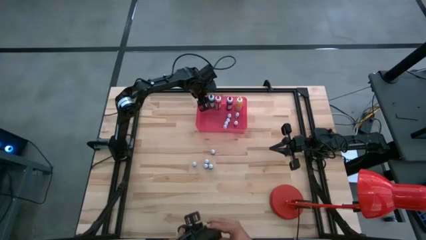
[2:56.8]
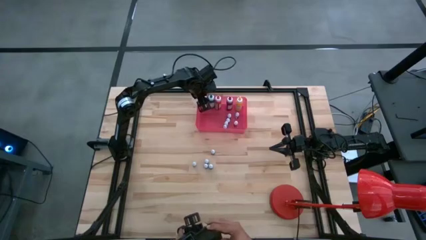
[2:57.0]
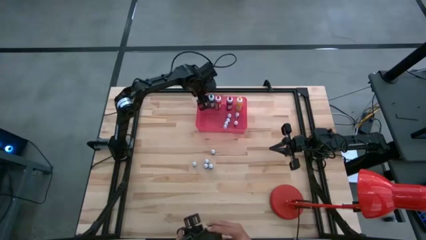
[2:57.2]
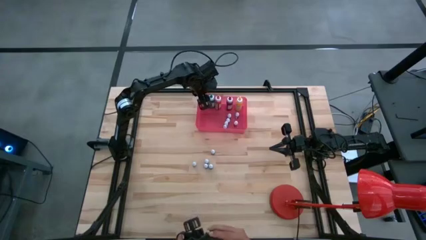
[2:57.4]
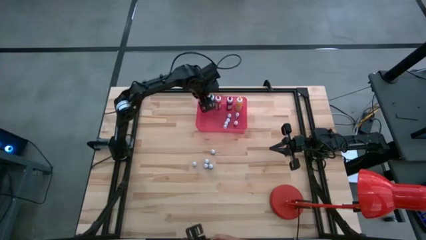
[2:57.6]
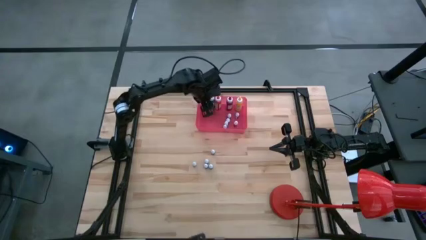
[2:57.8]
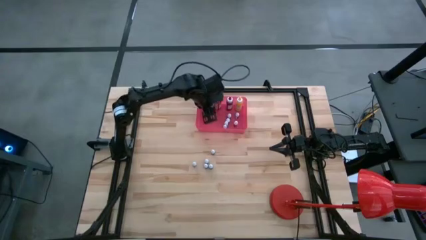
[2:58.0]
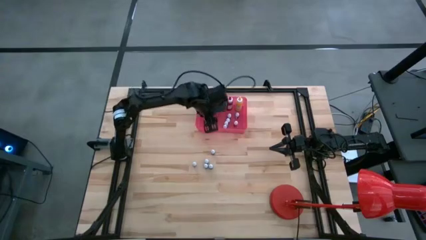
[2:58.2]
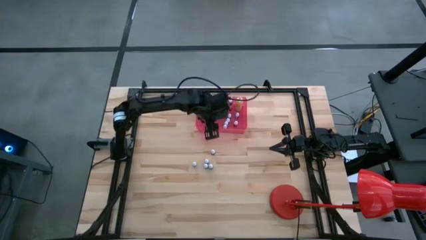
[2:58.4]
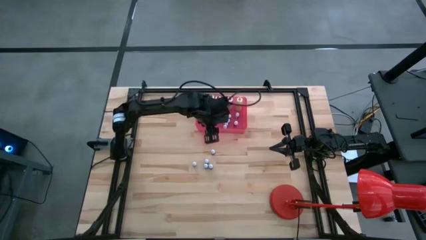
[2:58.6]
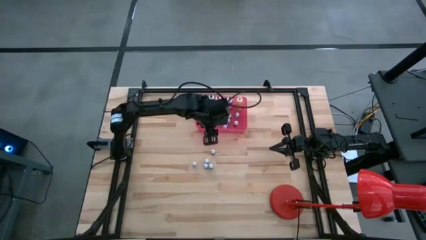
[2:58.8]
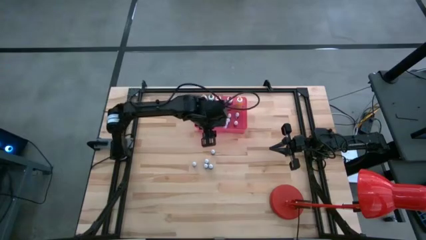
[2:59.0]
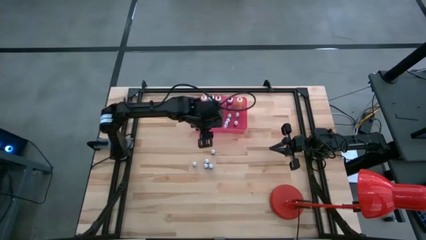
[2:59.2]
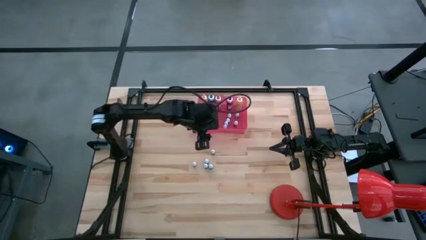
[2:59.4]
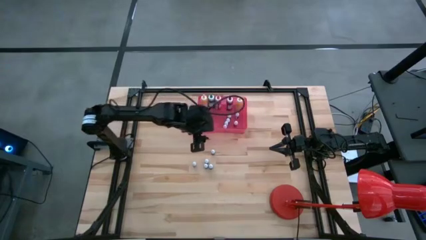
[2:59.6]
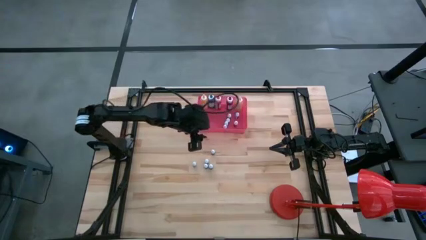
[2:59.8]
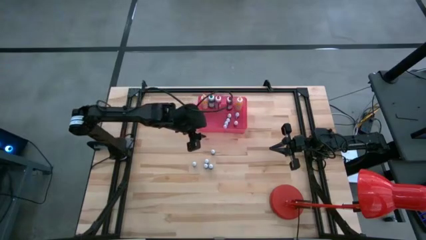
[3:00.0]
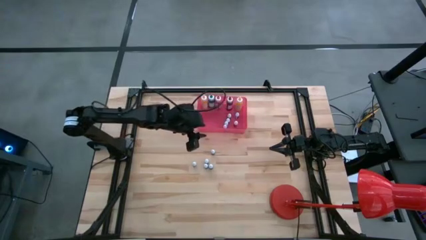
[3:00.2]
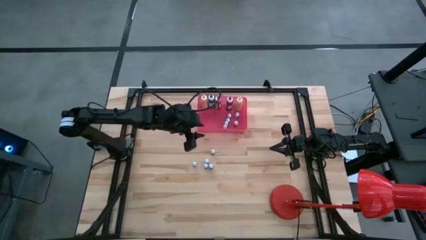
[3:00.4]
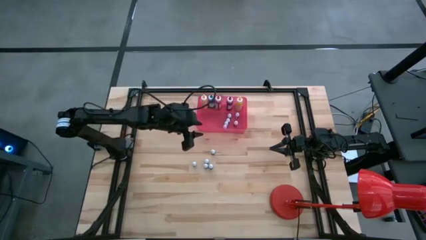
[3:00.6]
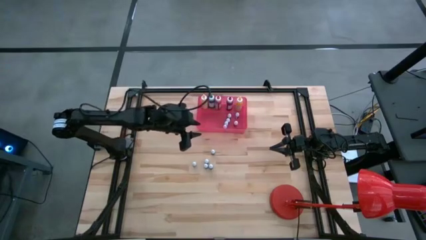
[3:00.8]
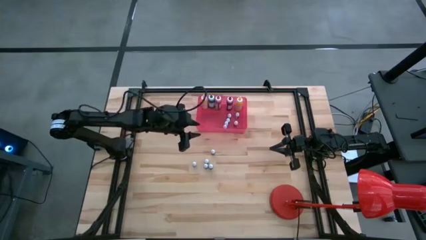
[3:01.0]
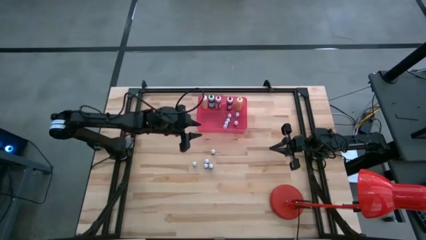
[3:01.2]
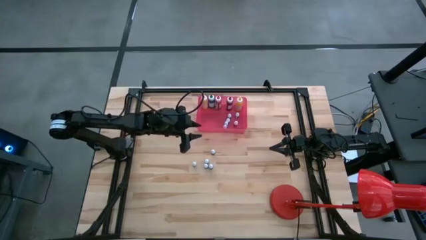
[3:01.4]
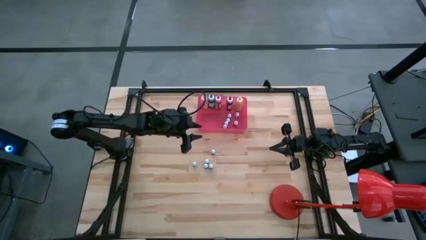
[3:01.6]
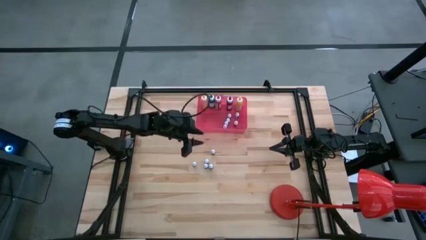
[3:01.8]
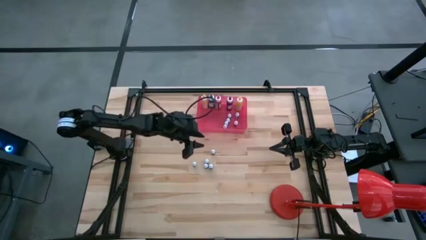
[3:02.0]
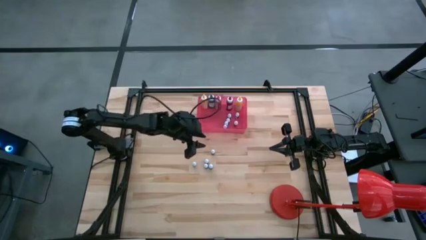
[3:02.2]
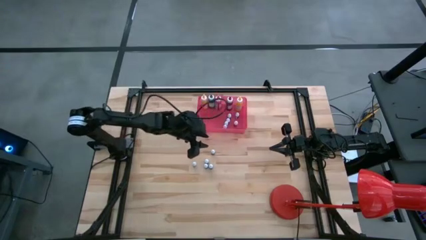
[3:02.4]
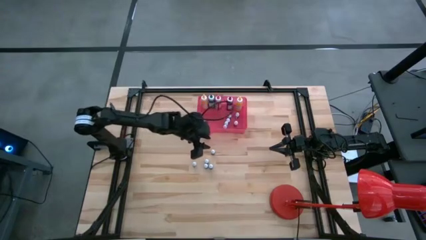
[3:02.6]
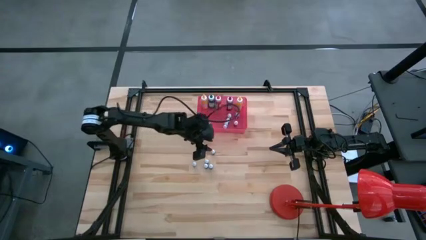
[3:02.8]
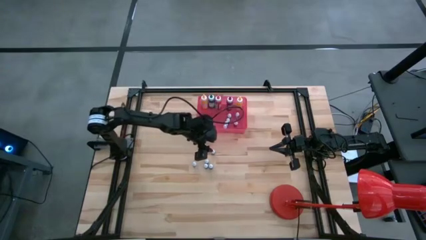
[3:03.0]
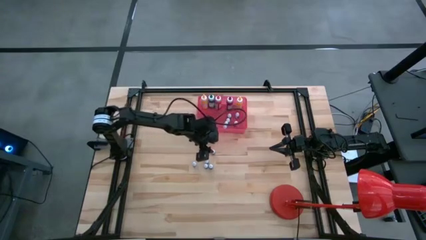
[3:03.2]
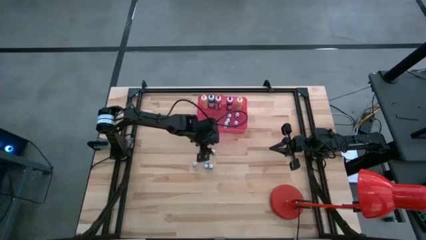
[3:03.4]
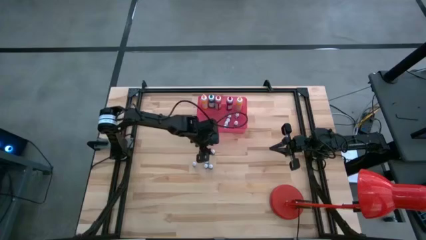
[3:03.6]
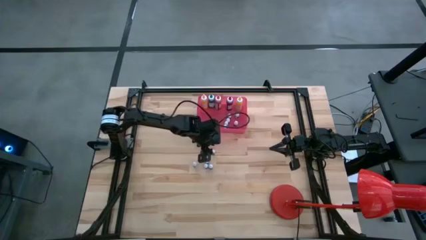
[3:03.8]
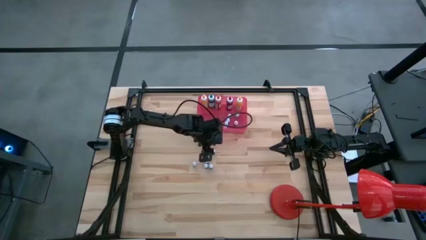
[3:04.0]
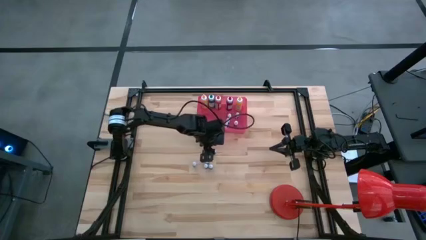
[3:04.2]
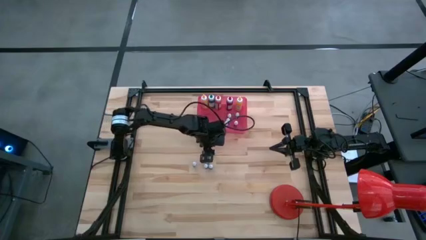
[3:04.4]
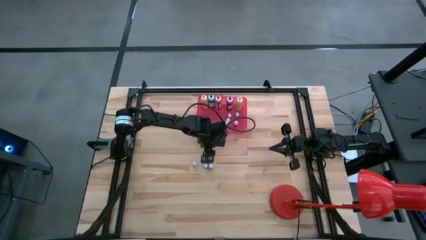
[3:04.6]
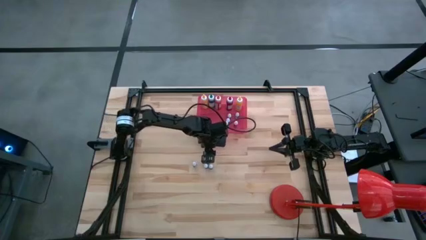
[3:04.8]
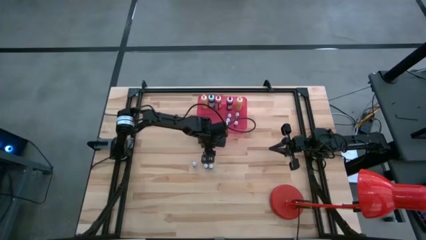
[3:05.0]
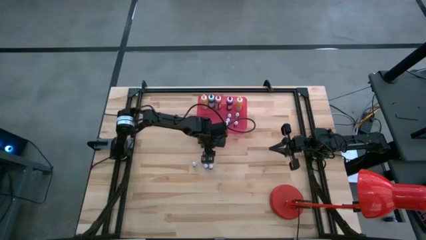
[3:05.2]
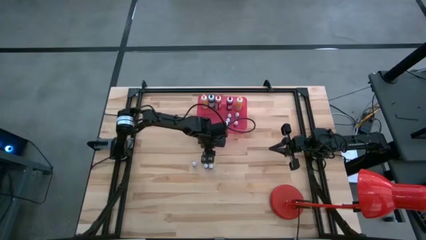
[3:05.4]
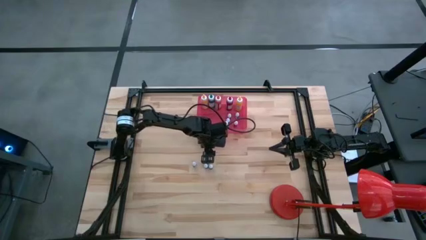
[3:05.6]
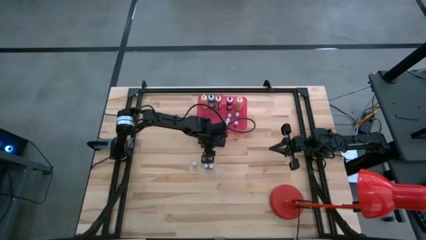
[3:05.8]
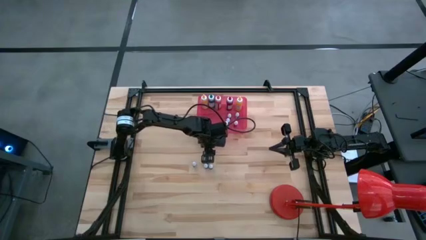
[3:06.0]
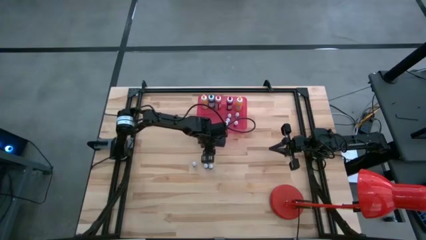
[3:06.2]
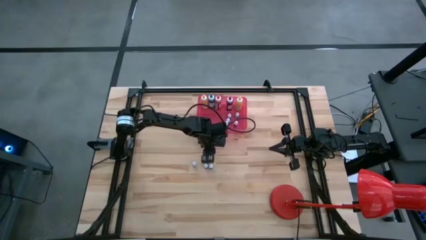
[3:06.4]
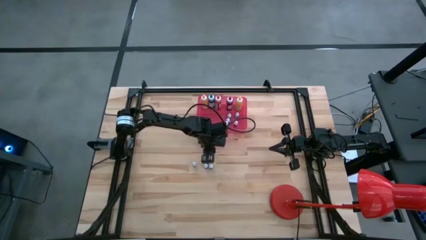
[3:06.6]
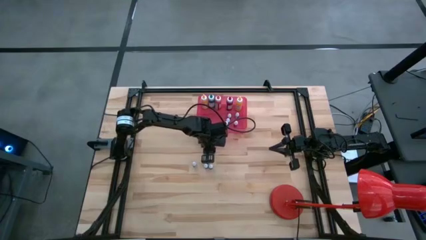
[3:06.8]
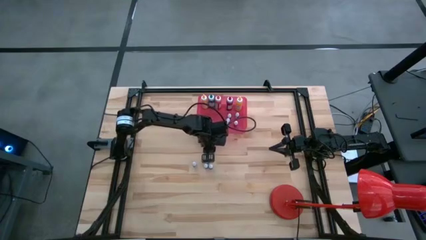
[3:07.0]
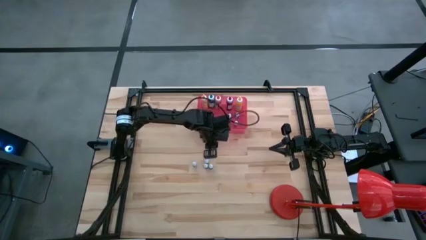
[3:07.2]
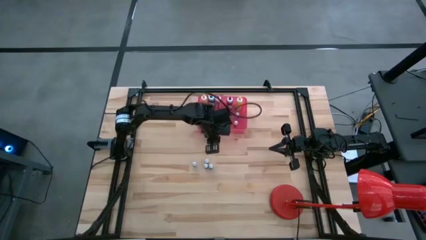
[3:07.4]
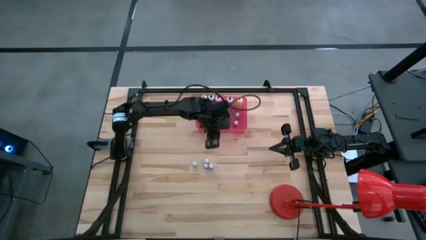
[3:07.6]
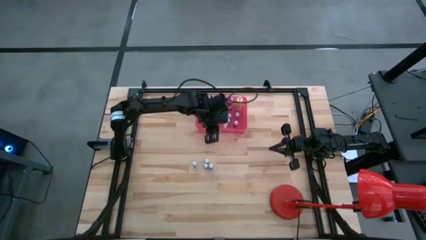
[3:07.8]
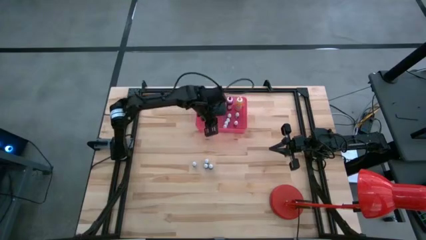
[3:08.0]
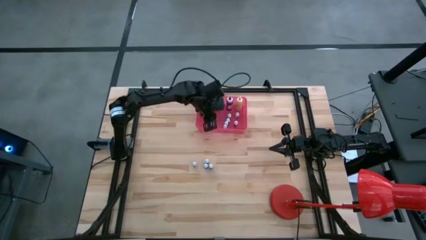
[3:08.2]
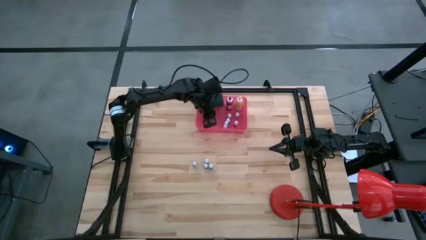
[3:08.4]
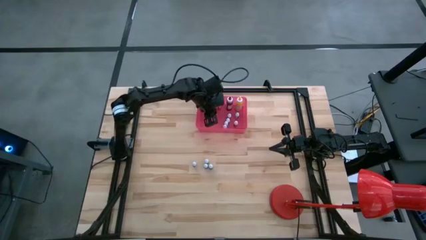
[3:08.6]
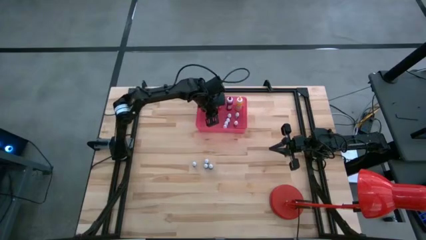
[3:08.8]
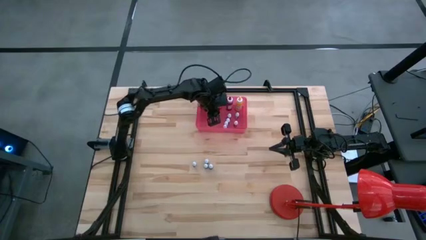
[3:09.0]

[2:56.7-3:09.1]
Task: Pick & Place food coloring
Put the small blue food coloring bottle into the pink bin

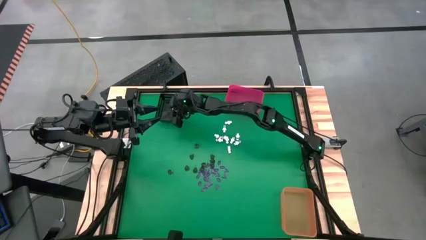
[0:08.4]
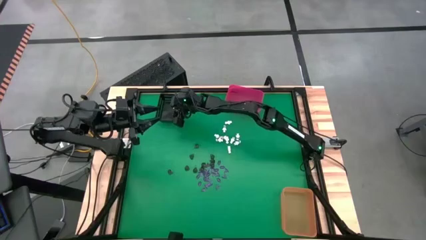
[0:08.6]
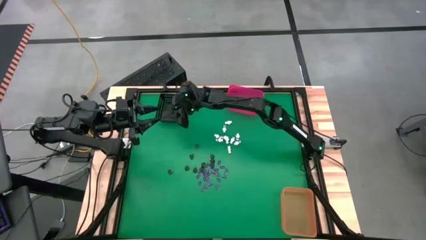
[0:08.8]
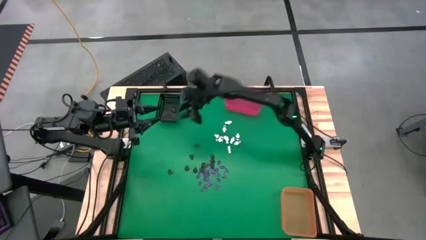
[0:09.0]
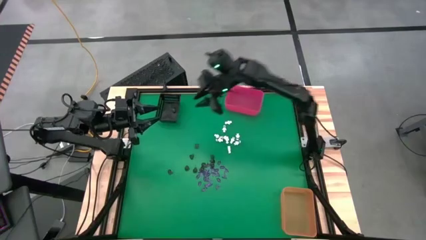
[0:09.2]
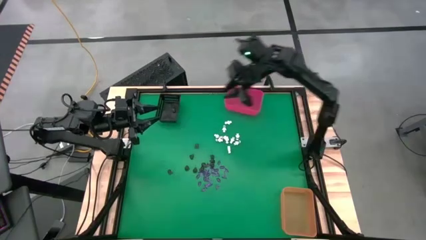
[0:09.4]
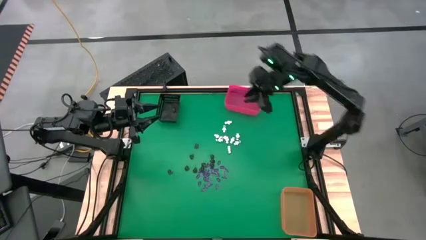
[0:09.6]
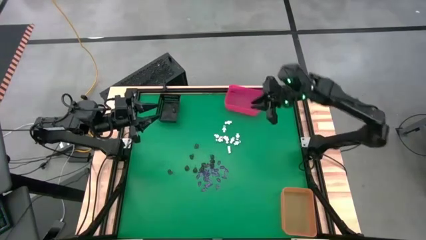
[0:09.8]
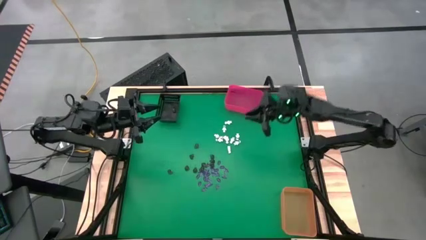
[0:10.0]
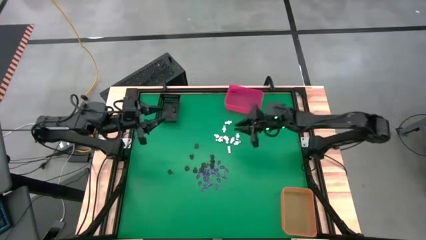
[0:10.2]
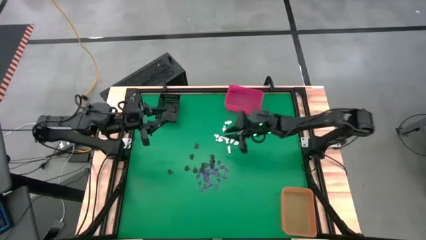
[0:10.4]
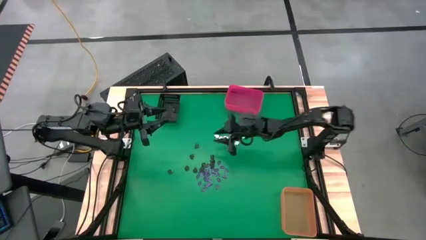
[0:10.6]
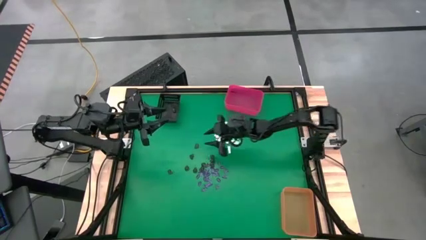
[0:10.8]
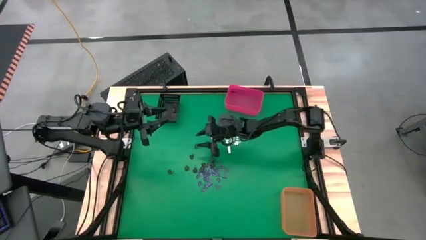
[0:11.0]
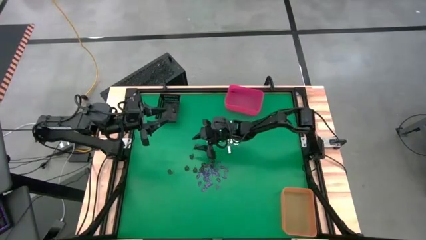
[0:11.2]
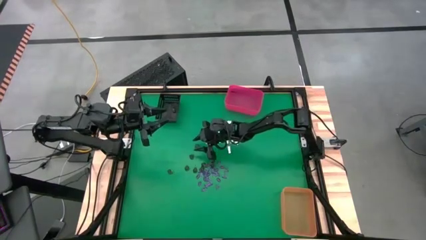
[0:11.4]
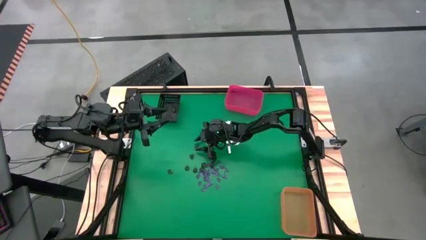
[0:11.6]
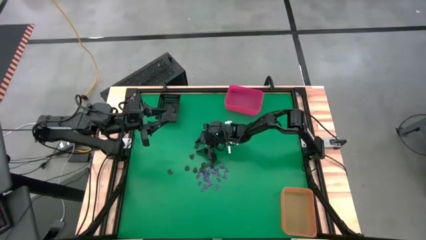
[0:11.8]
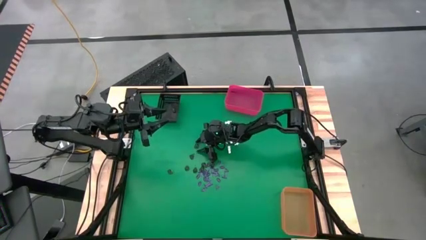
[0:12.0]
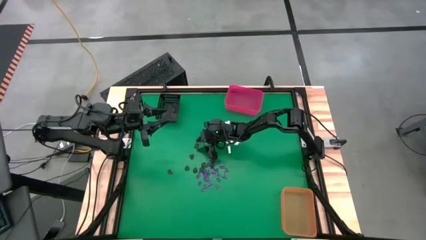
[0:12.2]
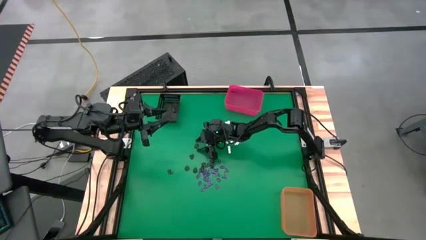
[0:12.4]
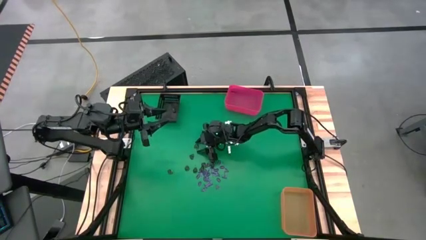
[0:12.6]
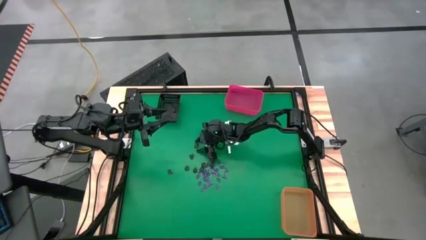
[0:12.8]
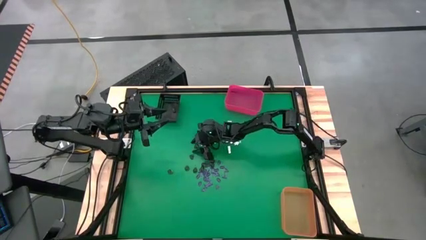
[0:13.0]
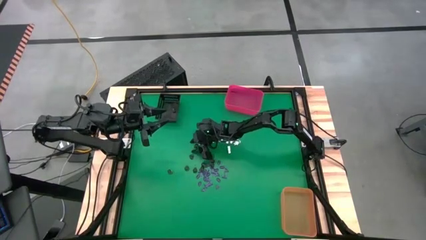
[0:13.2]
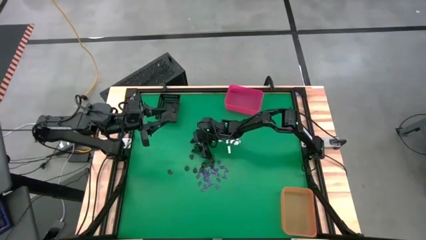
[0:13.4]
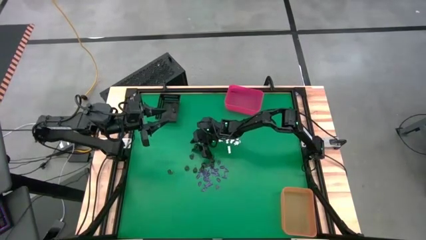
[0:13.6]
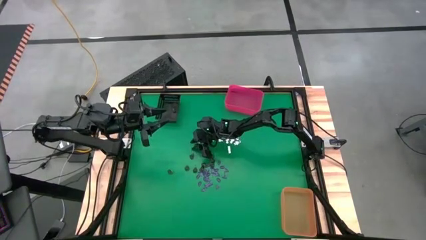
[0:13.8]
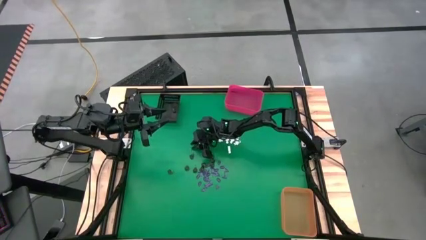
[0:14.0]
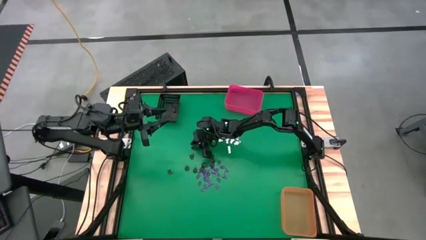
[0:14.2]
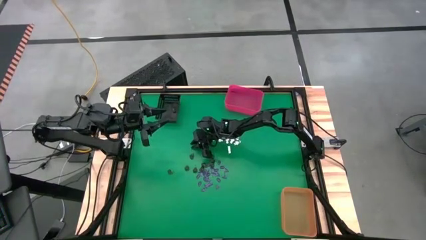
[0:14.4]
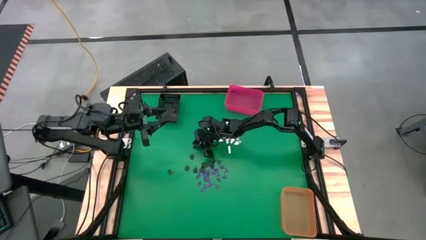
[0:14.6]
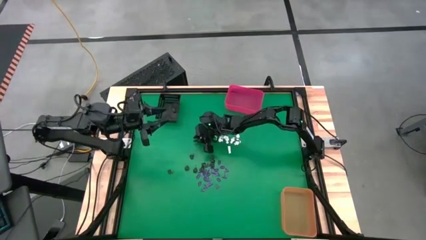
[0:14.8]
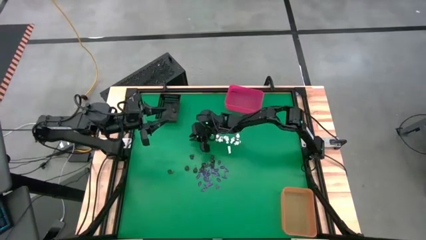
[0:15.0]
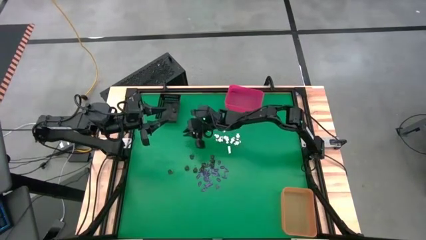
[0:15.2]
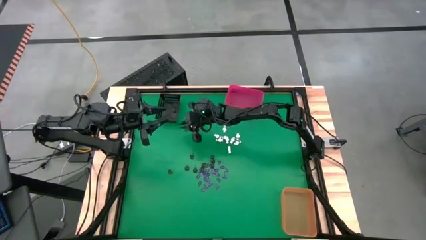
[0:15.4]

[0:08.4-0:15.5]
Task: Sort Halloween decoration
Put the brown skull toy into the black bin
